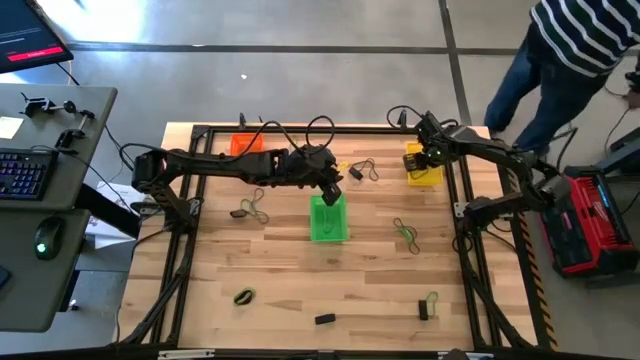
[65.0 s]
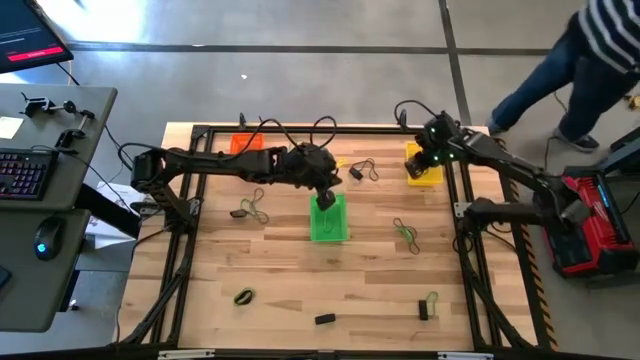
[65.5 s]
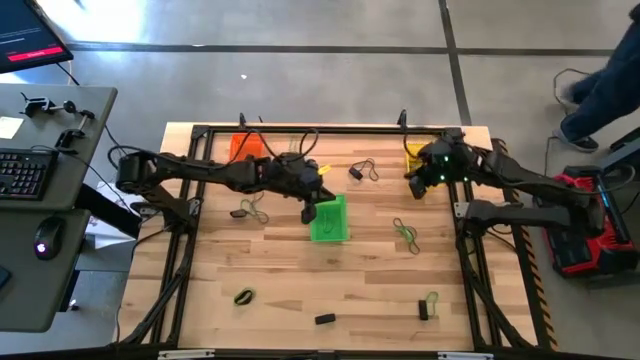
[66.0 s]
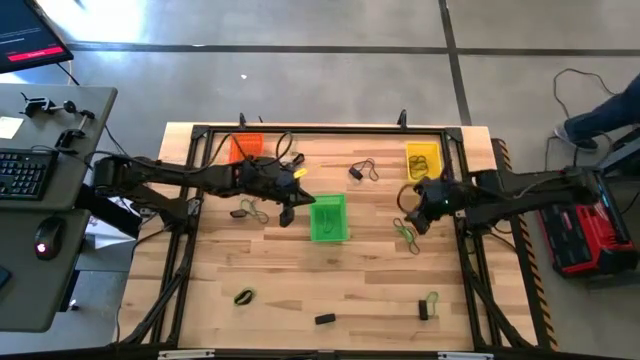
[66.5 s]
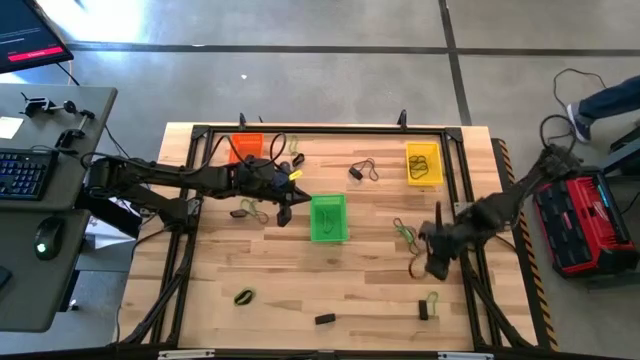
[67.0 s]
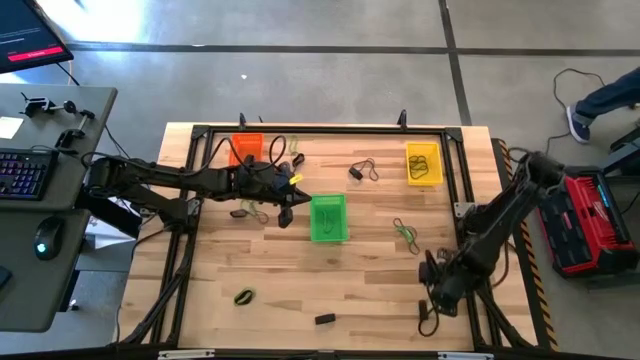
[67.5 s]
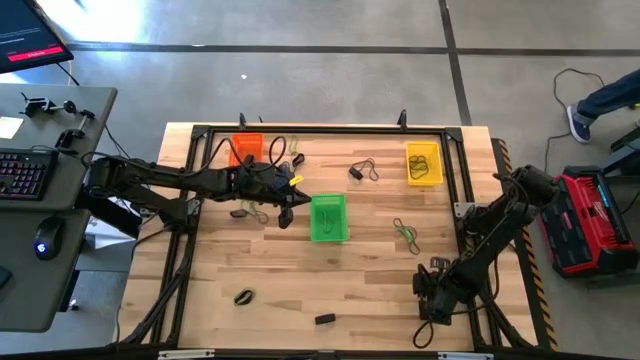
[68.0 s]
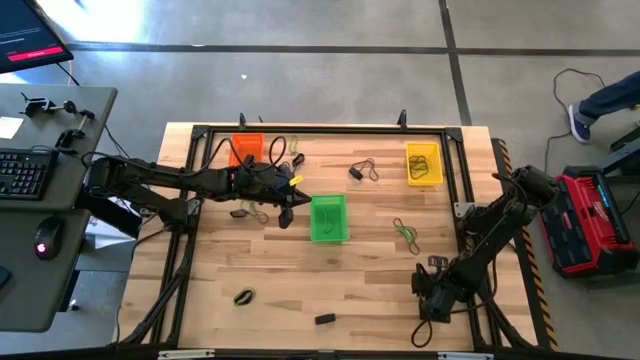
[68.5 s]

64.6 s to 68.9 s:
Task: Sort rubber bands into baskets
Put the green rubber band into the green bin

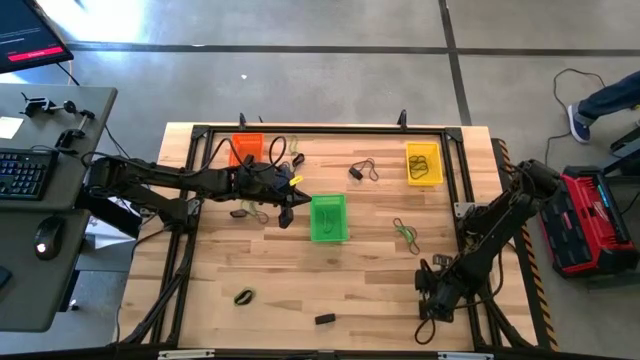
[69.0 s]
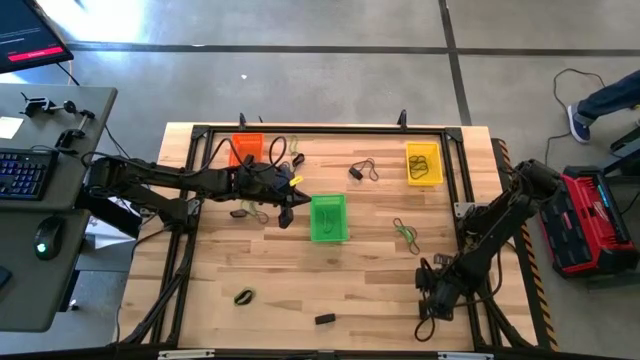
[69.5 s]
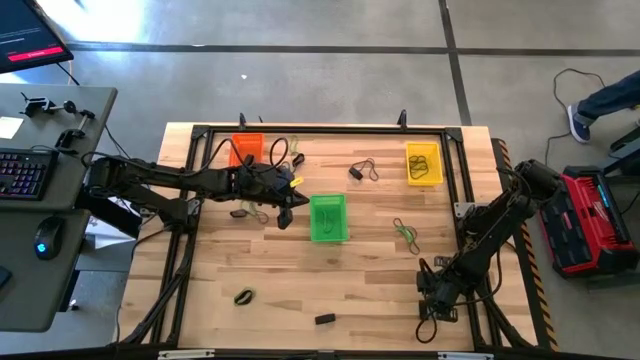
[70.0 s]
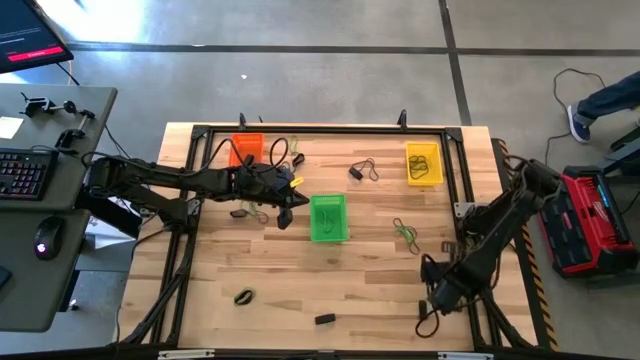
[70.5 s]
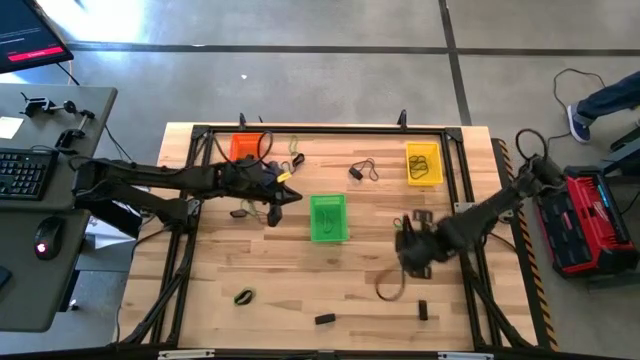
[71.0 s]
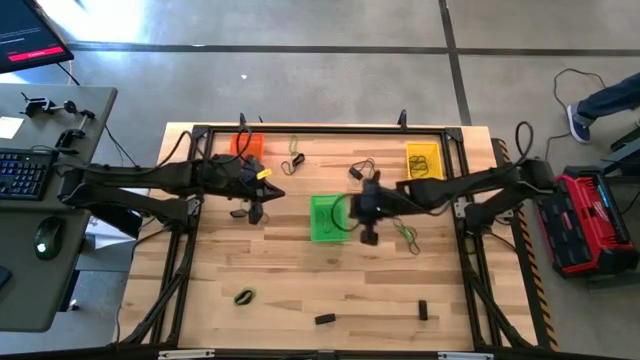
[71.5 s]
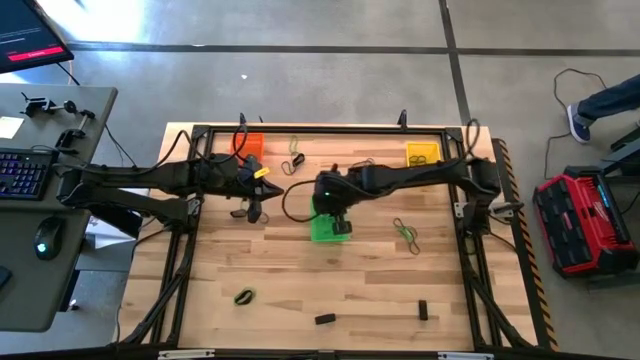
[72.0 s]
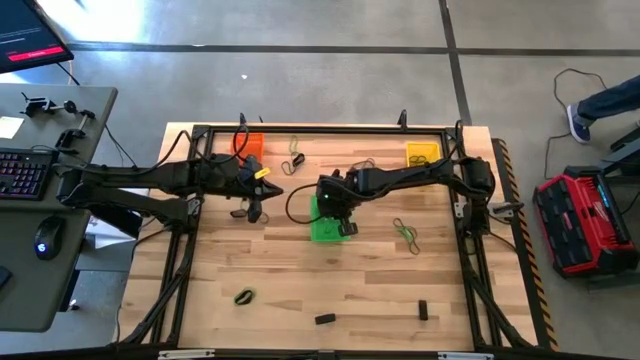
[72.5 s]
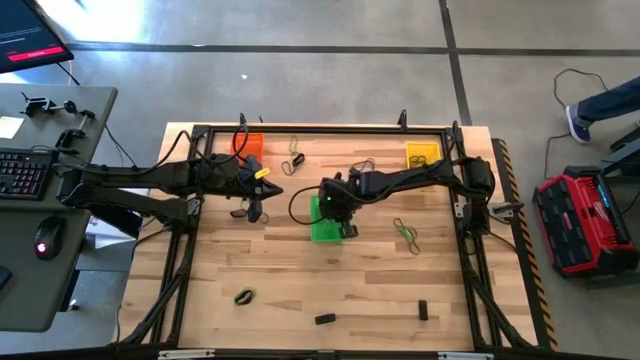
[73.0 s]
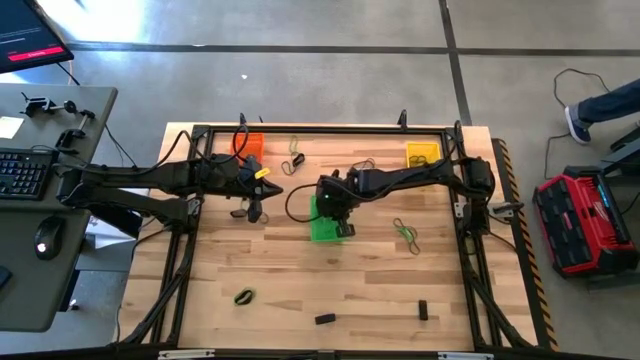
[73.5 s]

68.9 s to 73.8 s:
Put the green rubber band into the green bin

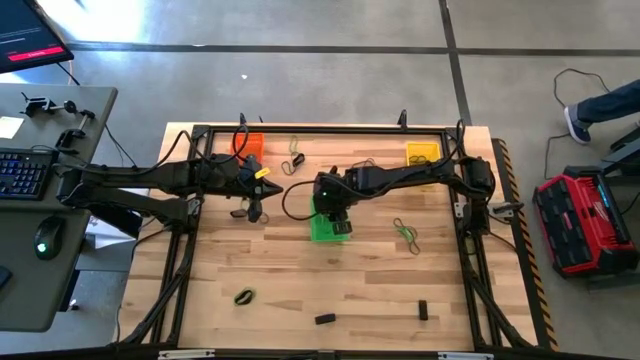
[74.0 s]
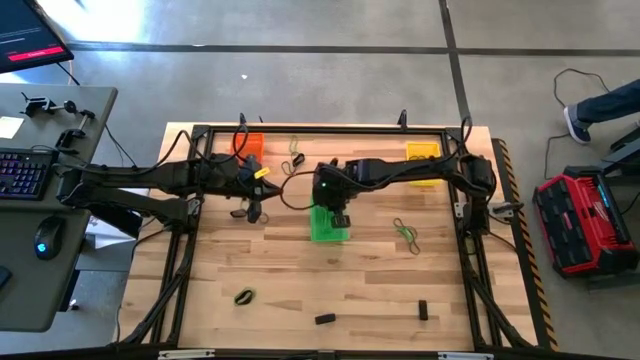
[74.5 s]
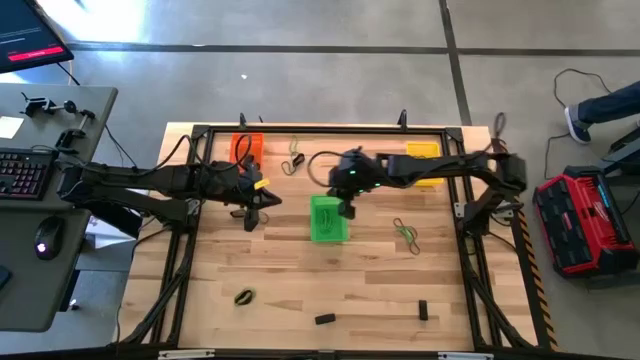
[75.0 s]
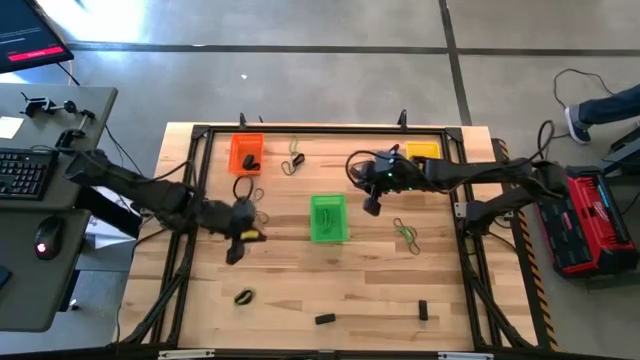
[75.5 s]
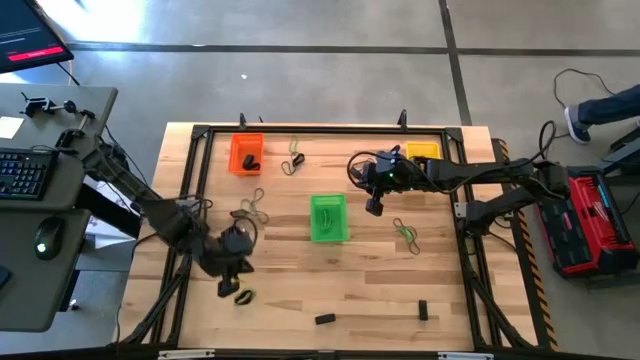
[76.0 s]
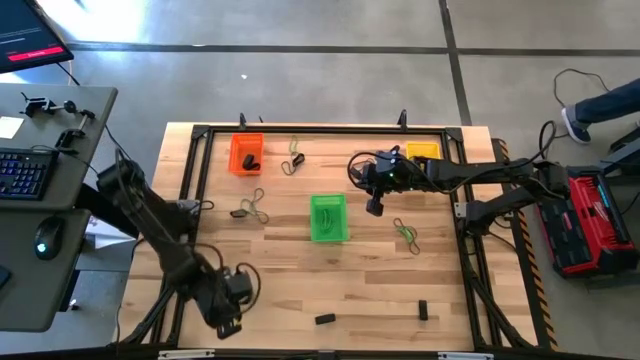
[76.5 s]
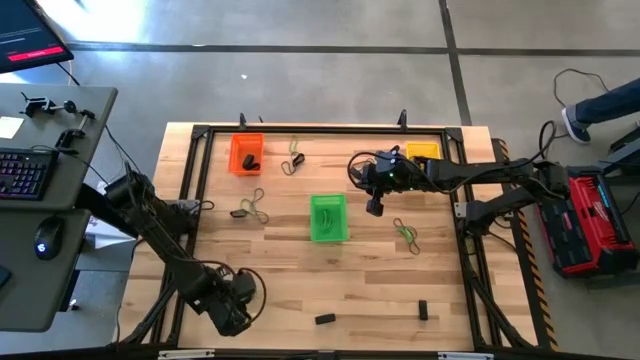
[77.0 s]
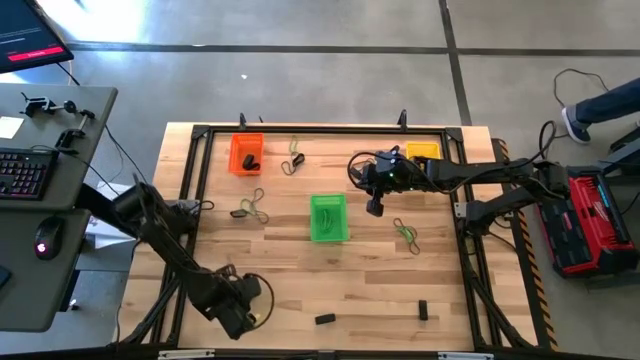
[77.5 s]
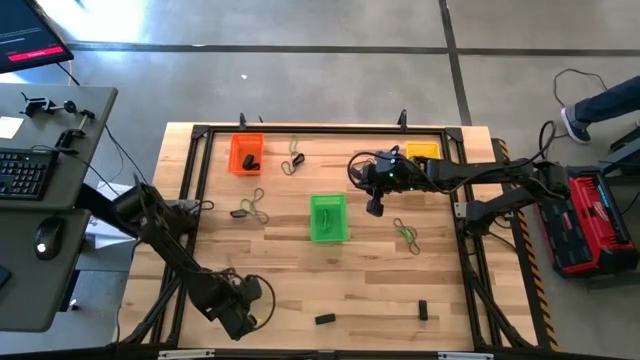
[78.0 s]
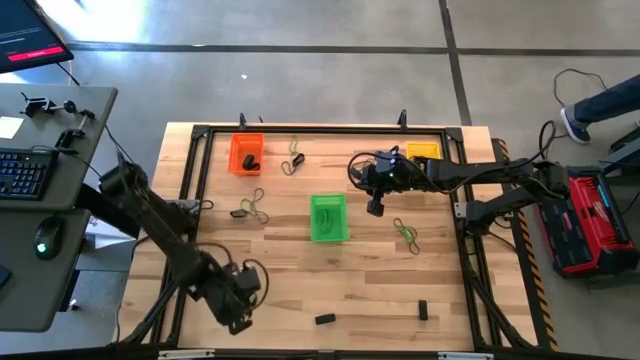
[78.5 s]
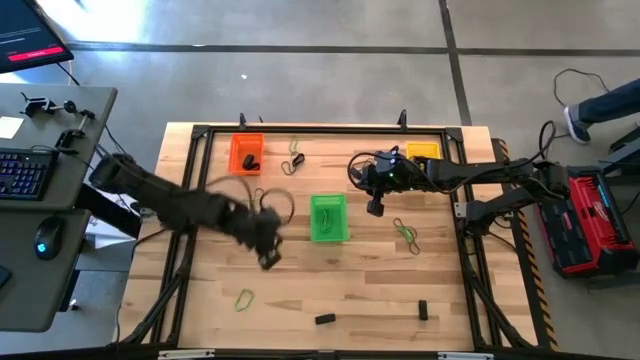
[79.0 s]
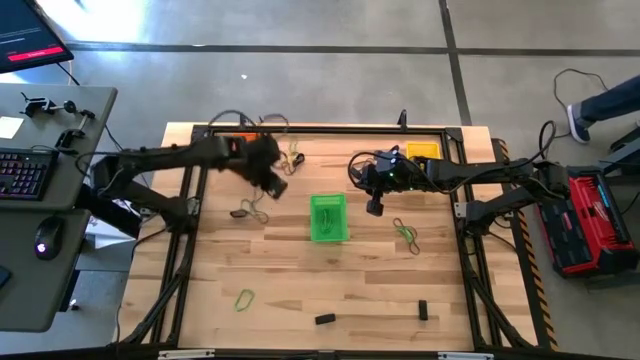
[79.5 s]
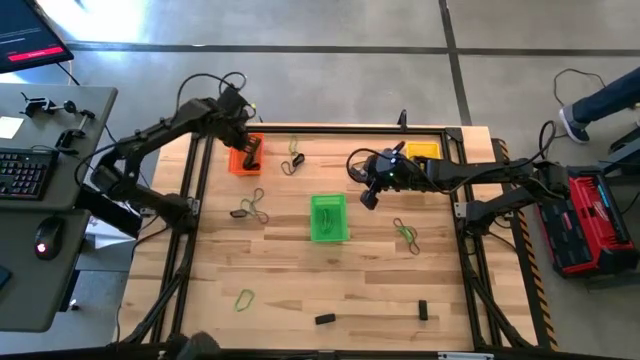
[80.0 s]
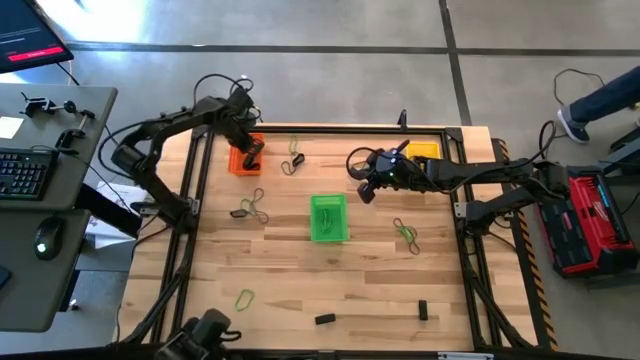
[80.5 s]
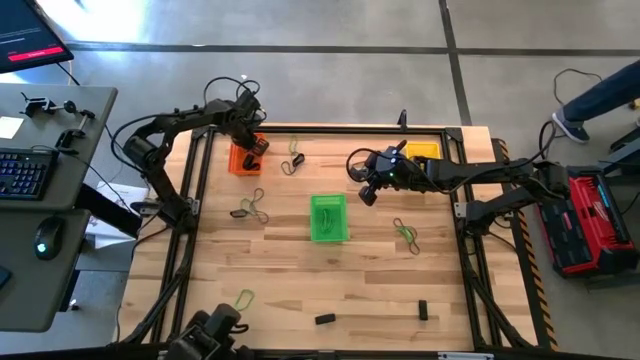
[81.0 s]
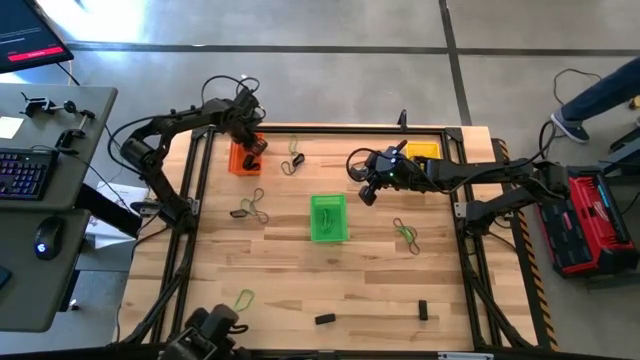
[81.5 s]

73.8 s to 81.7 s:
Put the black rubber band into the orange bin

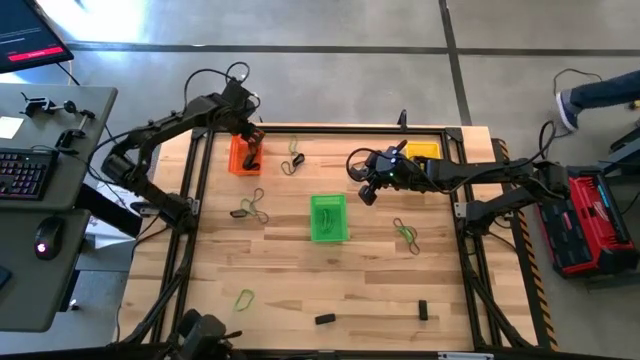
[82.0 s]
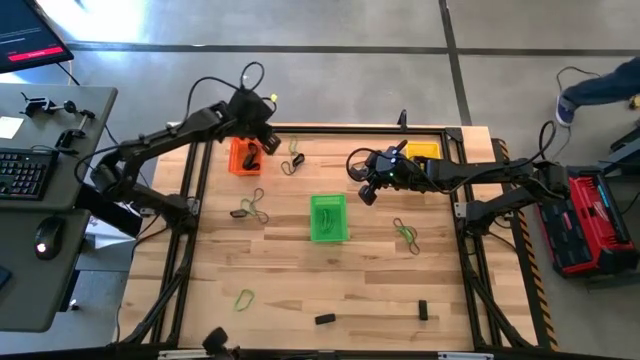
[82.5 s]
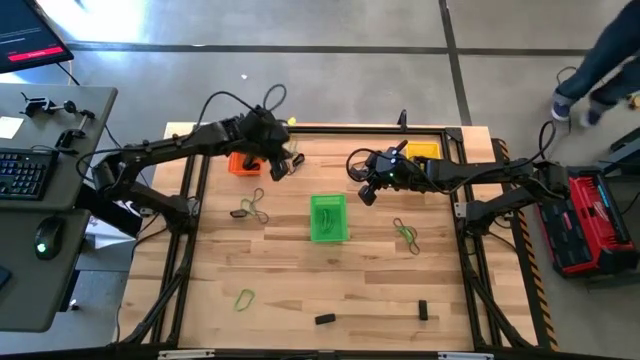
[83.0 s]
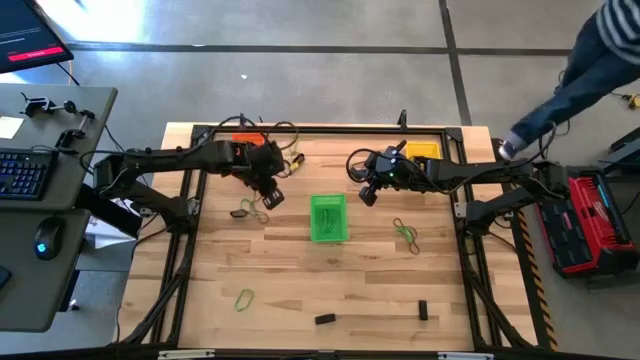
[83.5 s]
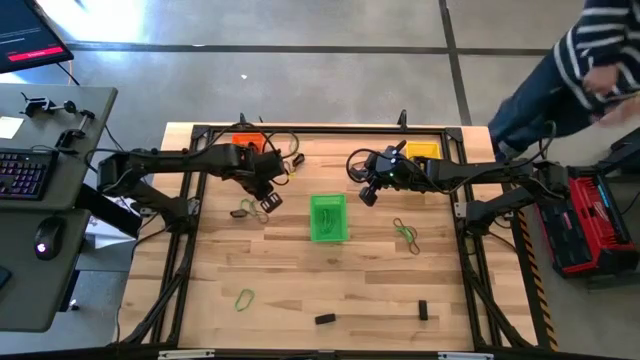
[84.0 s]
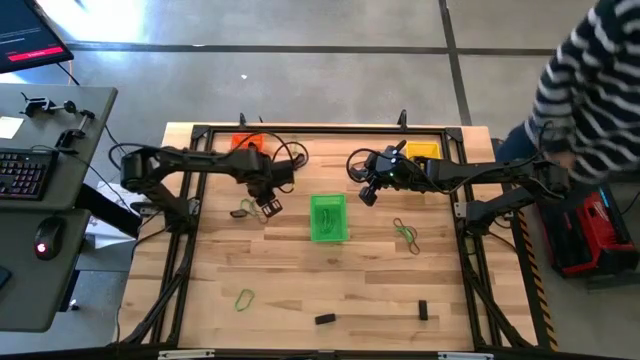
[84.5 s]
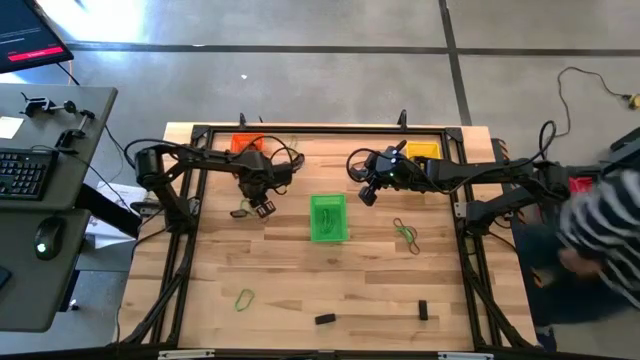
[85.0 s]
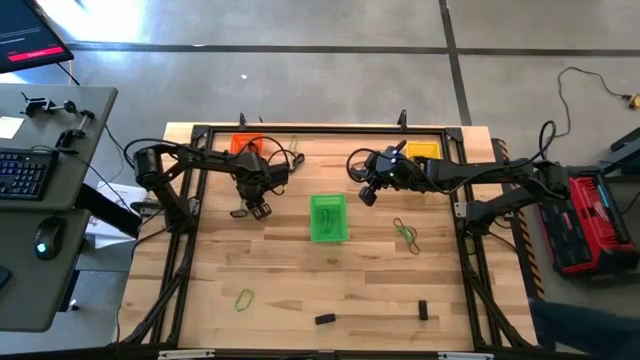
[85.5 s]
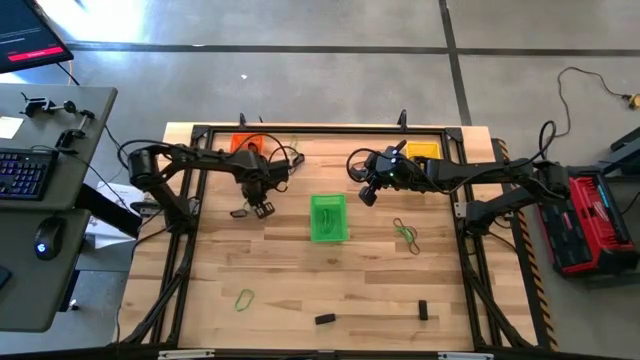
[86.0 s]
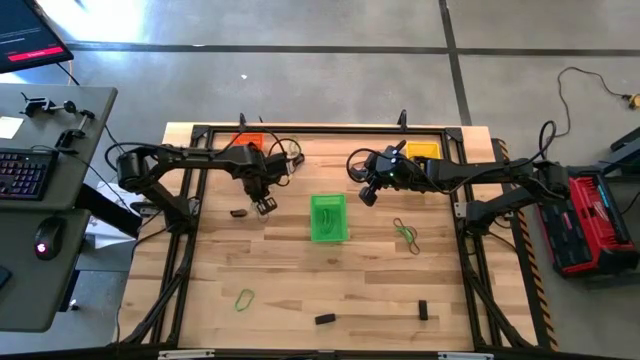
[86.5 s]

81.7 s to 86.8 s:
Put the purple rubber band into the yellow bin
